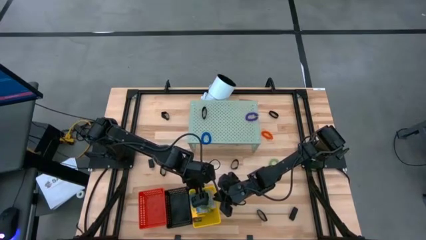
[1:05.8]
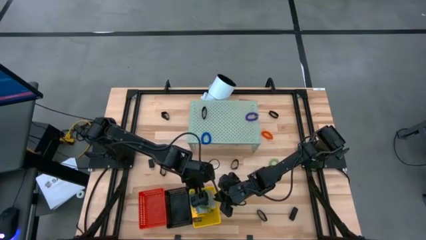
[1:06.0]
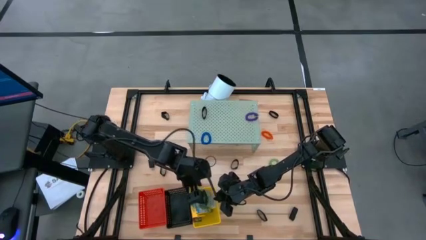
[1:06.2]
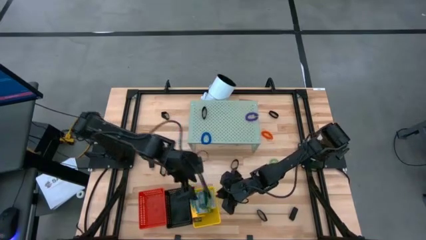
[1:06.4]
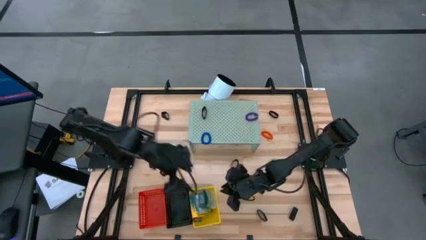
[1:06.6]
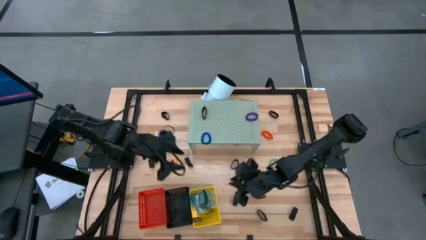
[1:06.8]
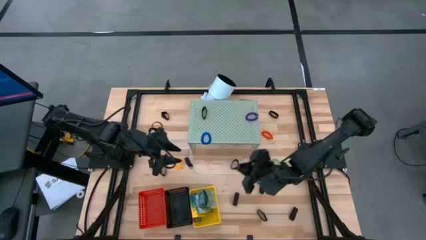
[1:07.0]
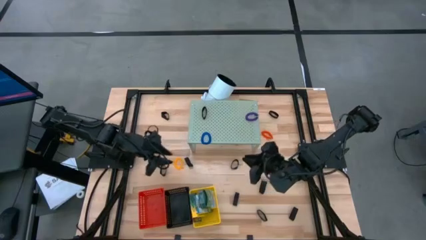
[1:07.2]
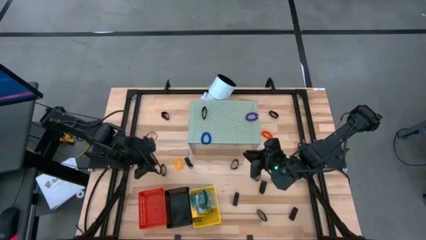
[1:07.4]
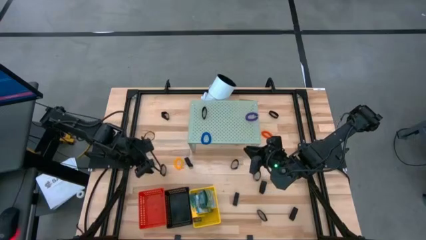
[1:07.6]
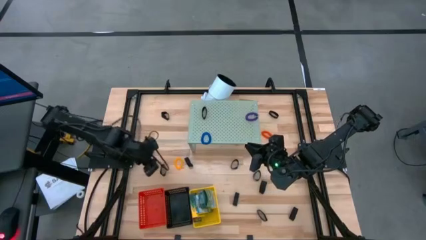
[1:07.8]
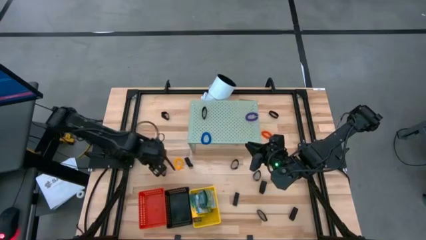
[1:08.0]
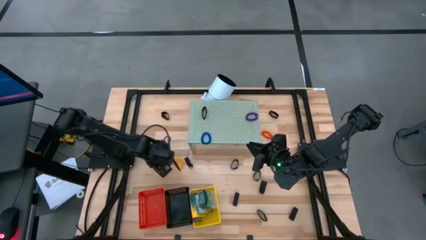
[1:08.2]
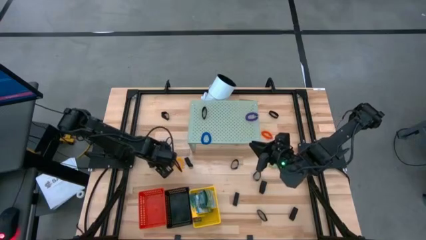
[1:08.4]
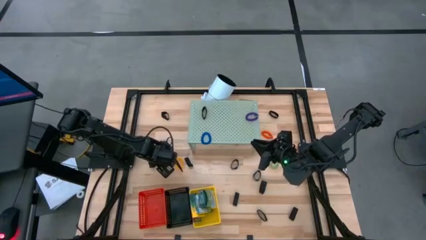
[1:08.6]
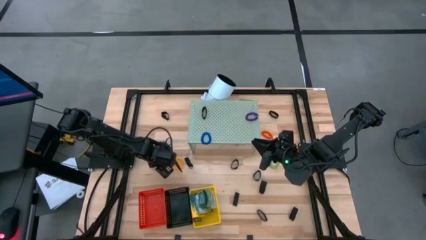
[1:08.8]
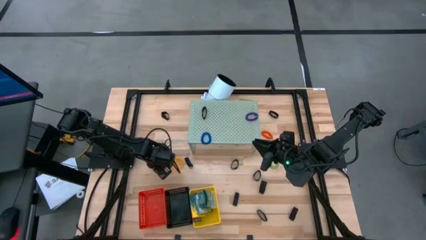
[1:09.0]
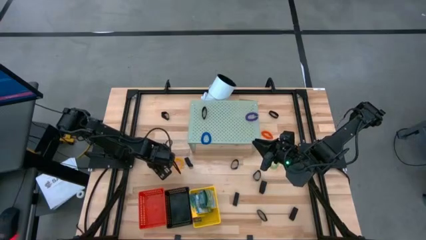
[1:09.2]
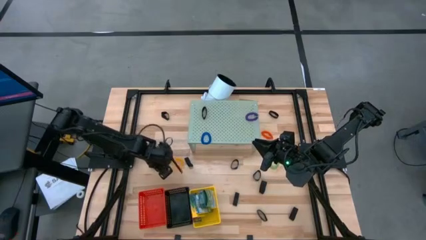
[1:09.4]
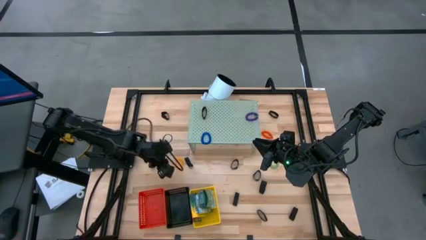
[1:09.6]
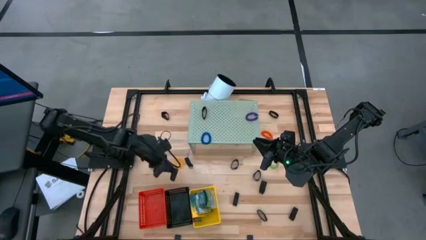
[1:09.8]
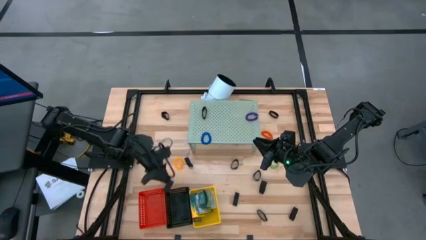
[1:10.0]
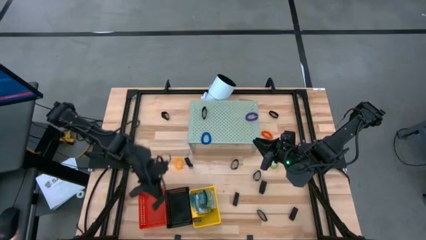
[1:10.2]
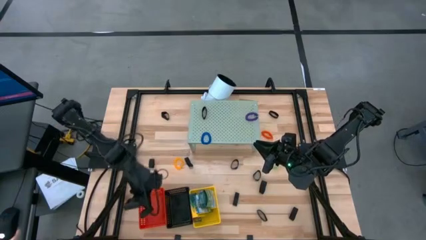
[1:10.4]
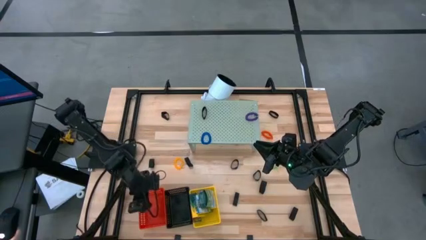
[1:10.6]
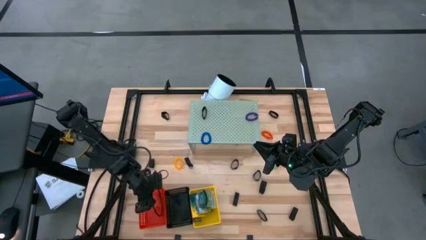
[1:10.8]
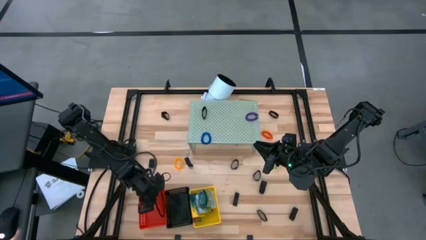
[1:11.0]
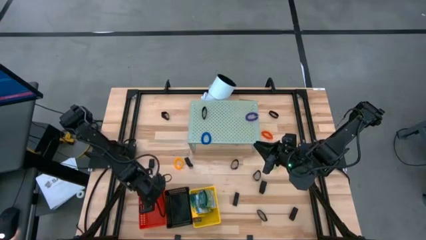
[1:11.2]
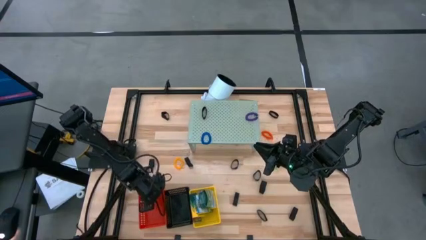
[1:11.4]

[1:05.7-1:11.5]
Task: Pick & Place Office Desk Supplies
Put the black rubber band into the red bin

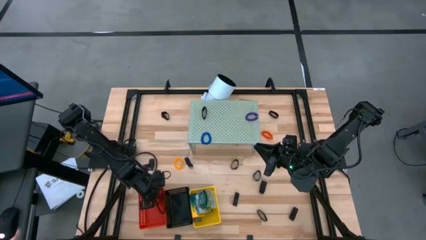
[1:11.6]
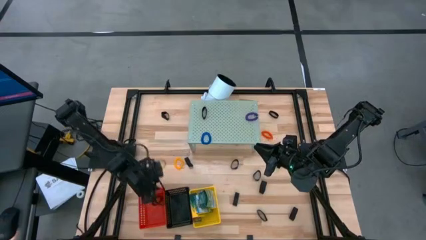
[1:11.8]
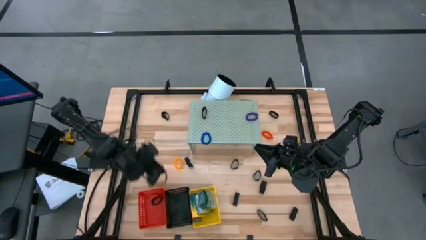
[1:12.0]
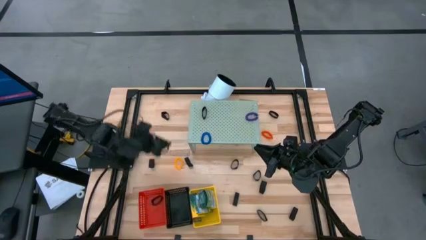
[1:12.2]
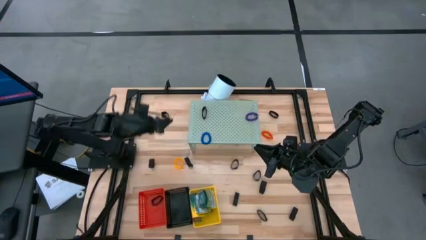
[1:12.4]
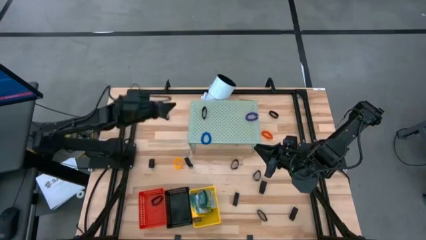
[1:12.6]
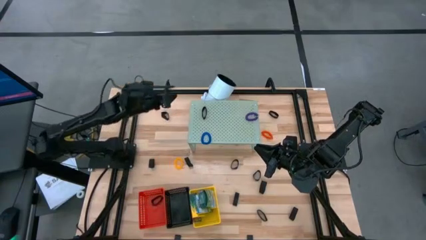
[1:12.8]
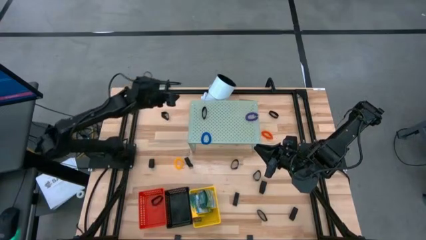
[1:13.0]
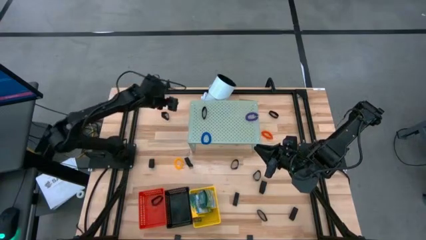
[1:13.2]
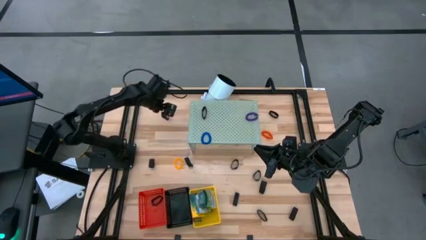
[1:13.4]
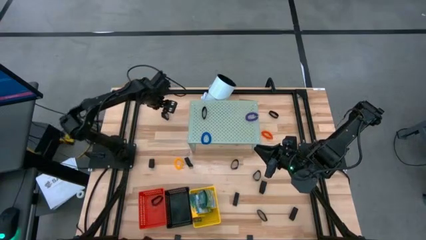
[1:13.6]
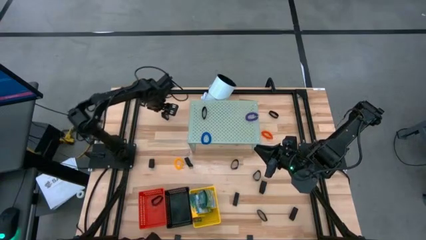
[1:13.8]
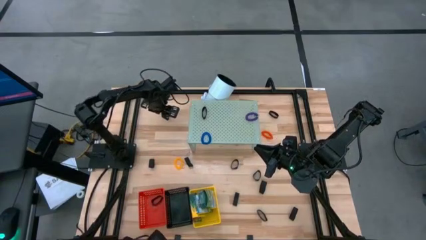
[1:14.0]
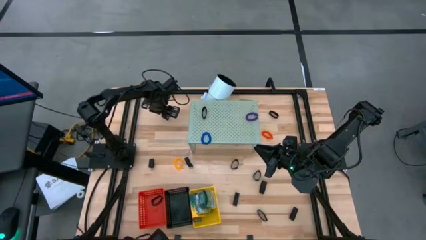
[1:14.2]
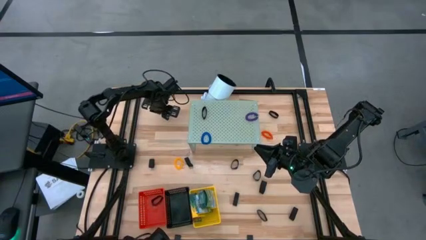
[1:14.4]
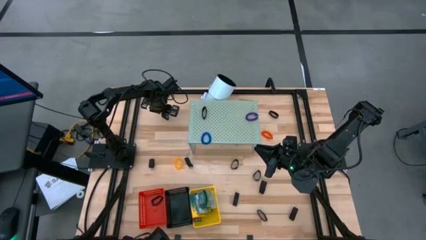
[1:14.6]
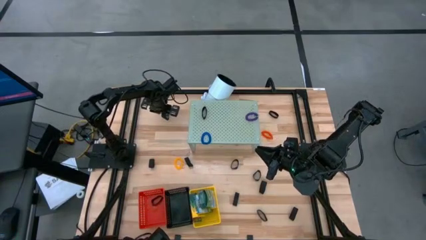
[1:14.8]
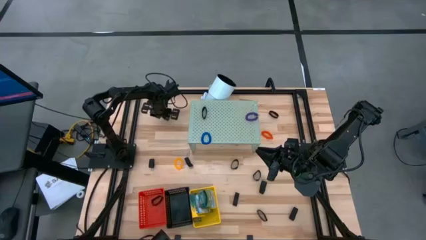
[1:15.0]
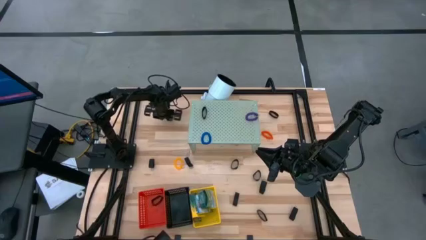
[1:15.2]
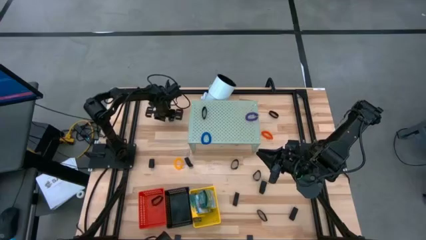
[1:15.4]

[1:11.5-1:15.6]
Put the black rubber band into the red bin

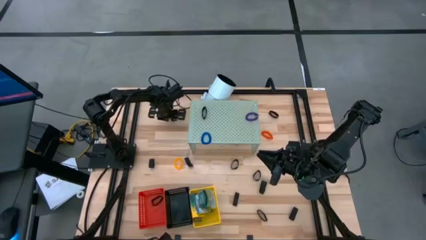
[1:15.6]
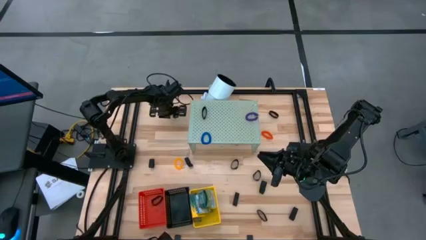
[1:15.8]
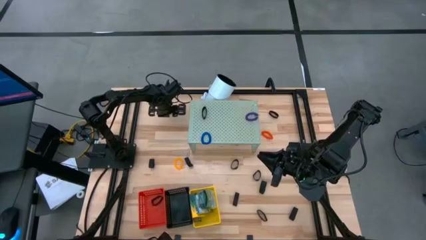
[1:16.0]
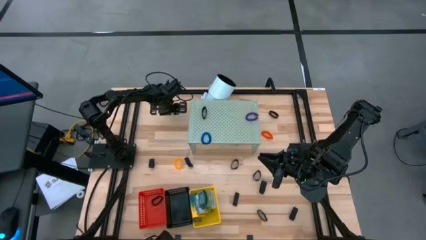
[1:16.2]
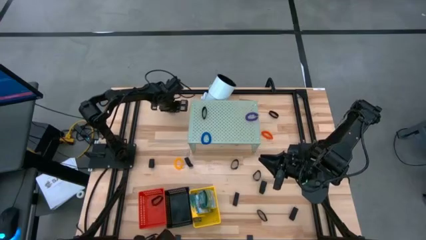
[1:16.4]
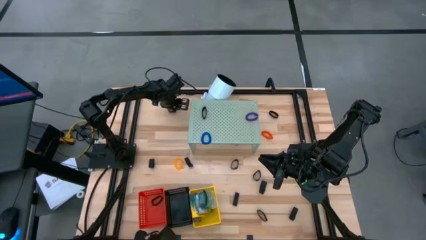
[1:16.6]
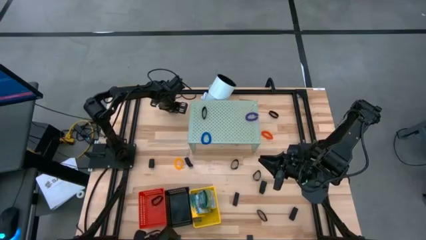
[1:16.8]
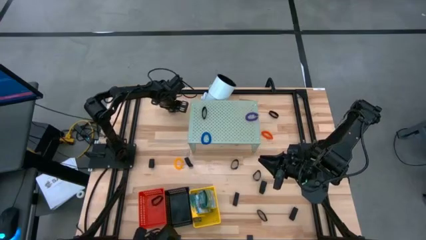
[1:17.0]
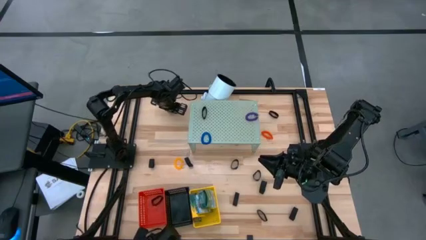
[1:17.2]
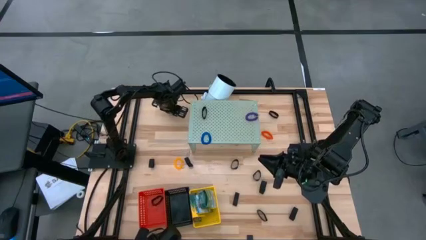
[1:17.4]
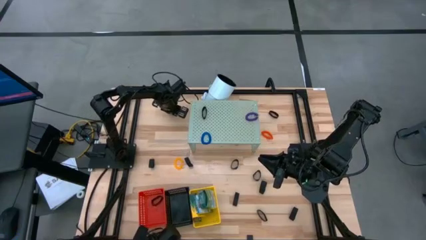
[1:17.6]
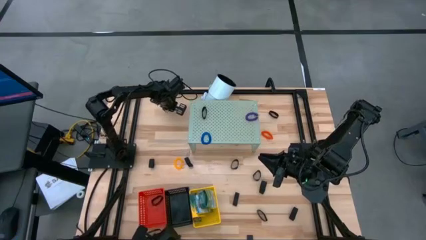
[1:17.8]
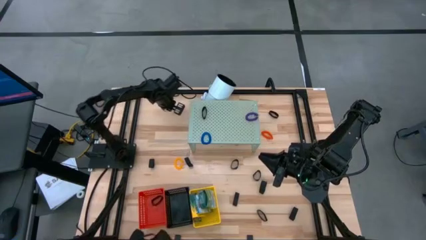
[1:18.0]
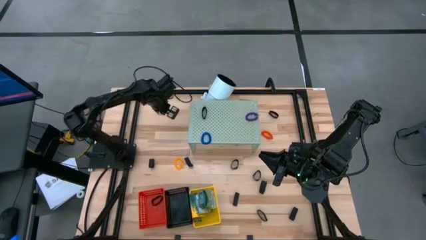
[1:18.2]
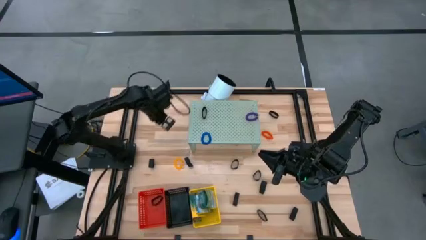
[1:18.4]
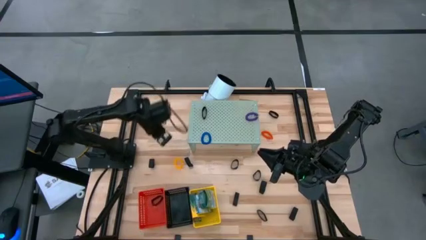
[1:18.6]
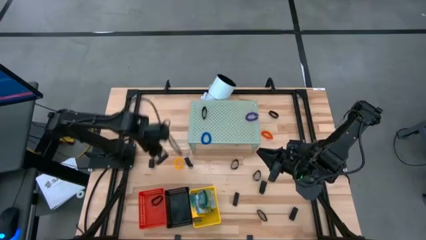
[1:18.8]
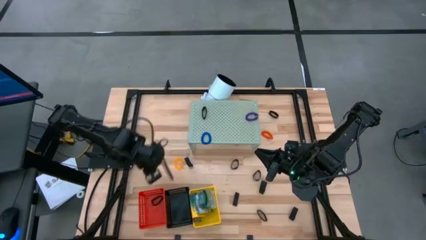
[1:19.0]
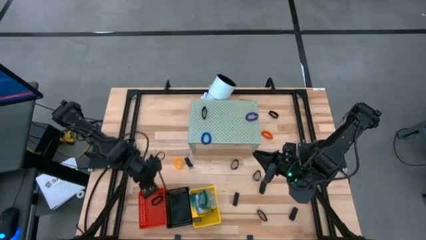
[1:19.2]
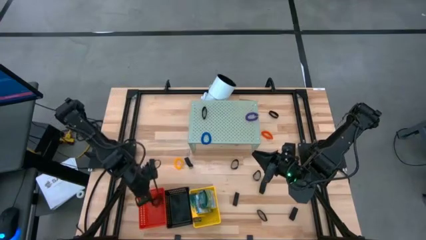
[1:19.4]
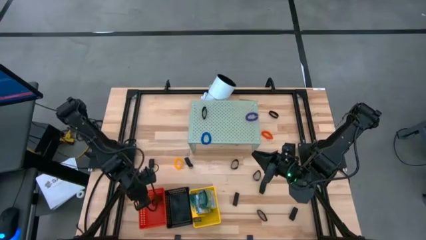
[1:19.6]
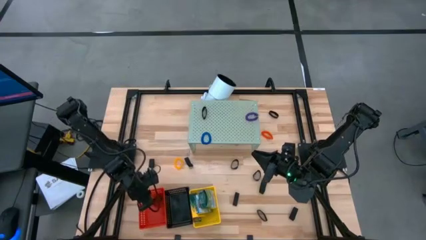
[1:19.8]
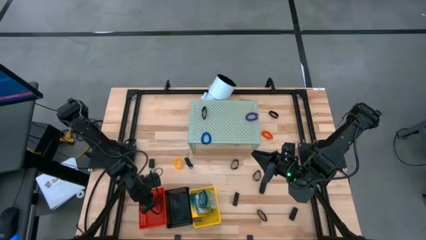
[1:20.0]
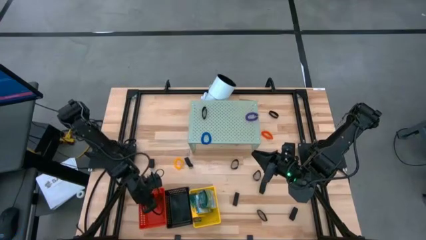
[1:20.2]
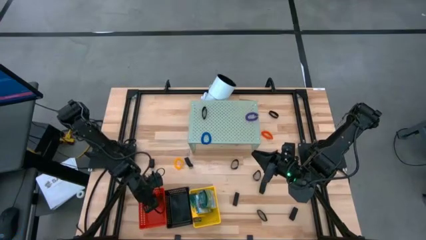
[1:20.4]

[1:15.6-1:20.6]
Put the black rubber band into the red bin

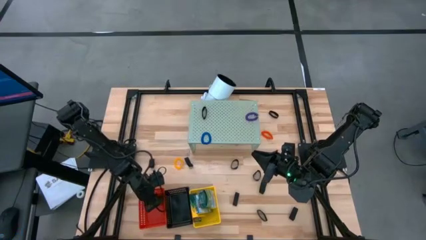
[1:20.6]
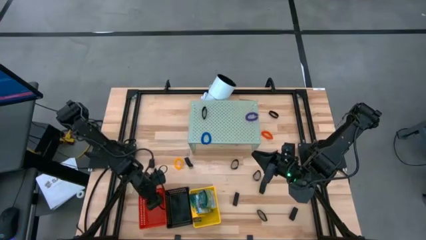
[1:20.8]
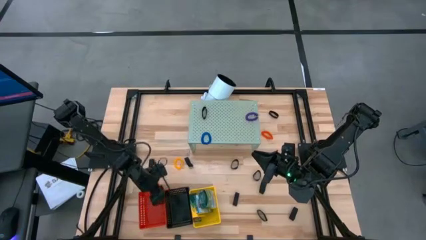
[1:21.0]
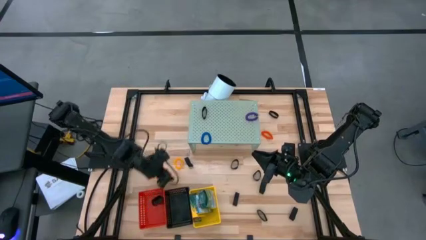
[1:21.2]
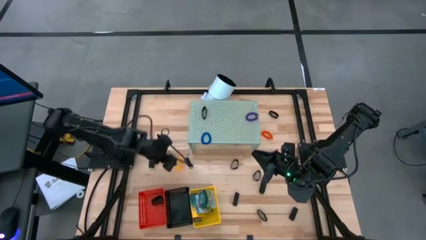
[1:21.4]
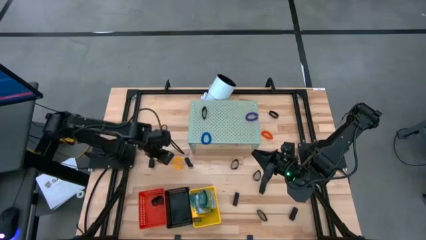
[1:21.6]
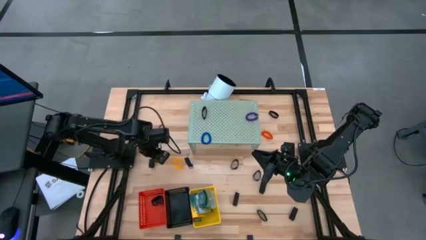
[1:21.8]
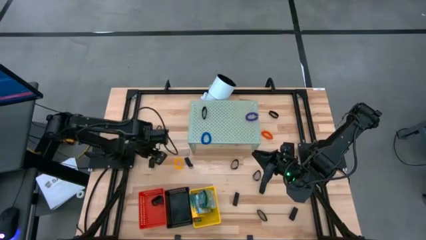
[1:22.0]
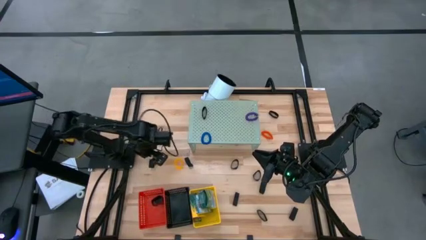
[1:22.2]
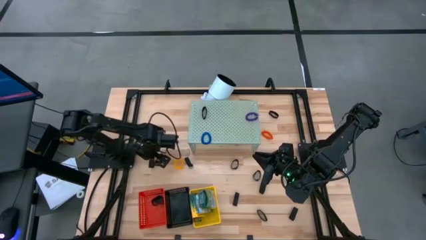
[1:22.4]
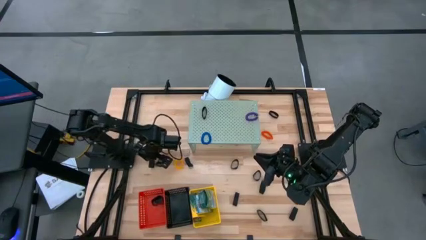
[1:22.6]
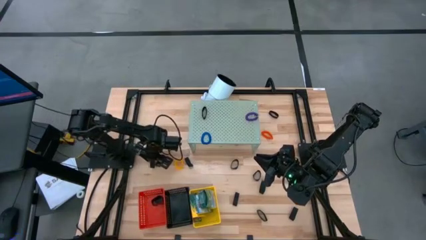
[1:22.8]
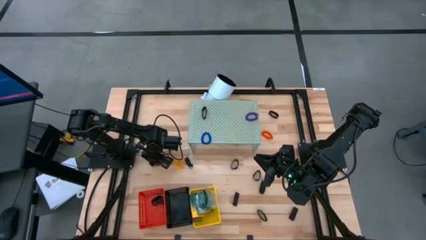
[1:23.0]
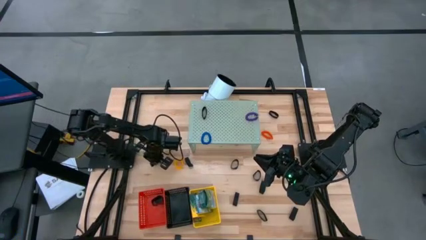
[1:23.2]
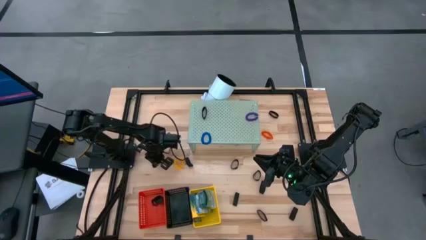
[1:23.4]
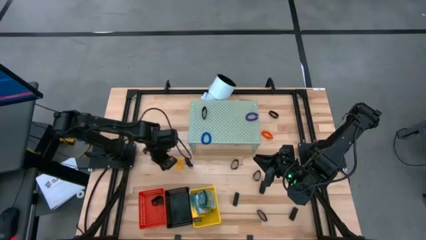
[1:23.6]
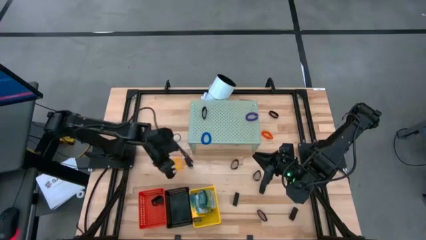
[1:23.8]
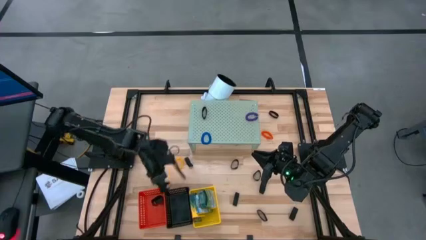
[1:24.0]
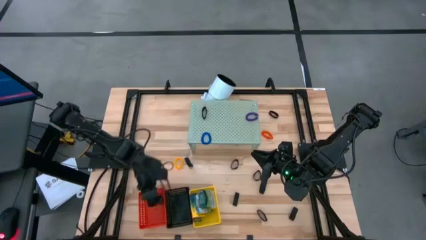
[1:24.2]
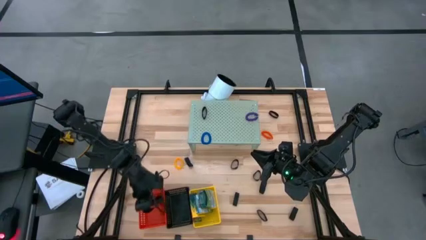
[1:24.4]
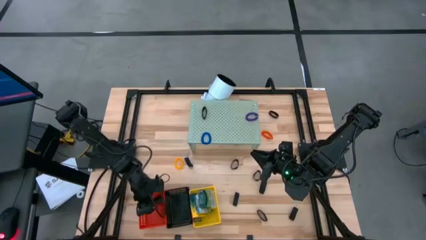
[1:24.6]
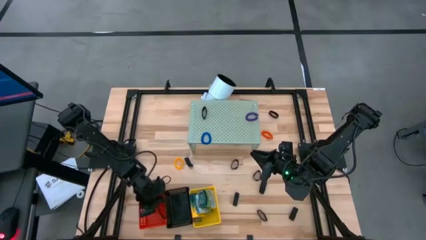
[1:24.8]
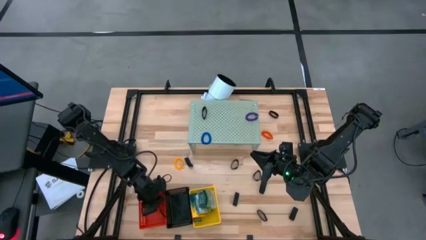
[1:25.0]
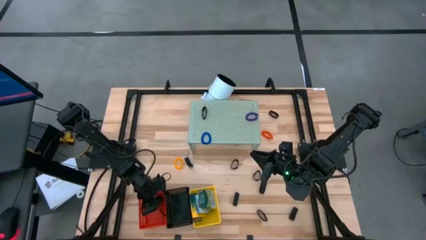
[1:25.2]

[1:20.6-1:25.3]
Put the black rubber band into the red bin
